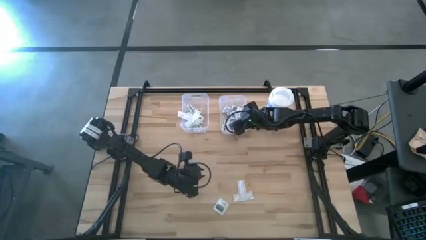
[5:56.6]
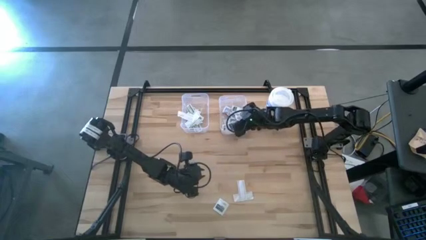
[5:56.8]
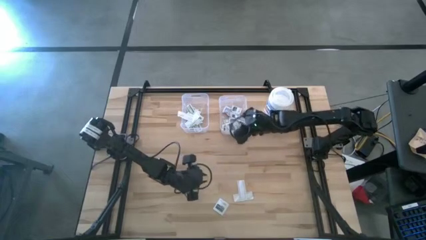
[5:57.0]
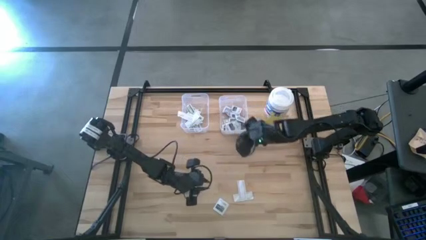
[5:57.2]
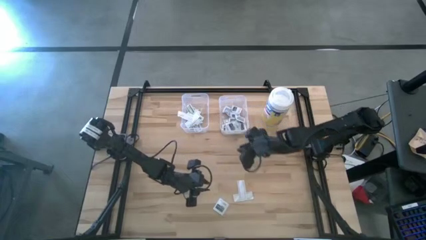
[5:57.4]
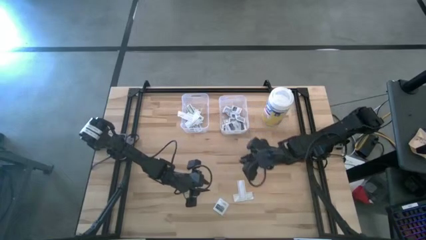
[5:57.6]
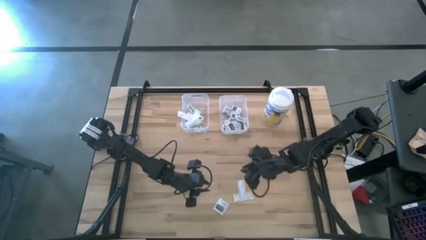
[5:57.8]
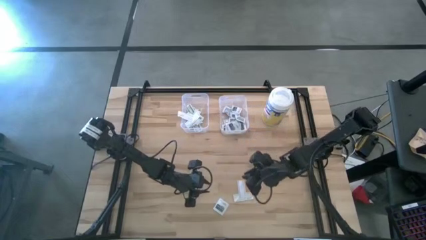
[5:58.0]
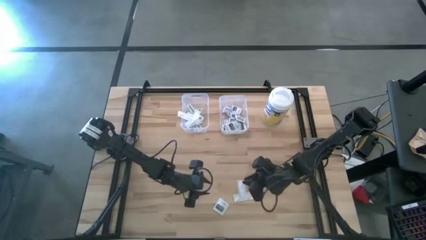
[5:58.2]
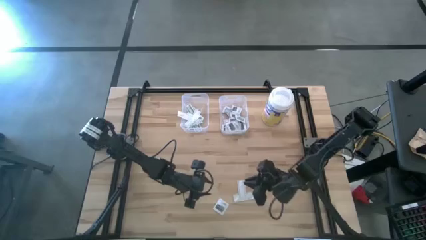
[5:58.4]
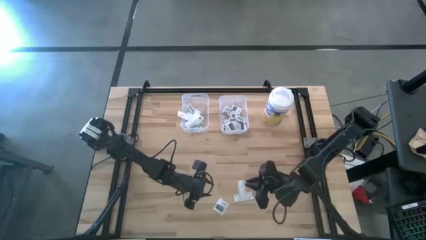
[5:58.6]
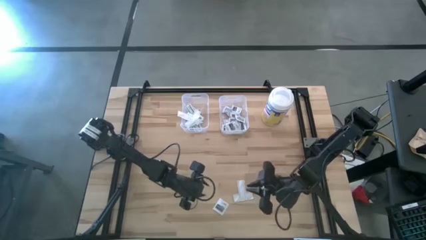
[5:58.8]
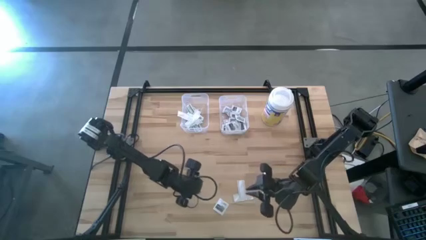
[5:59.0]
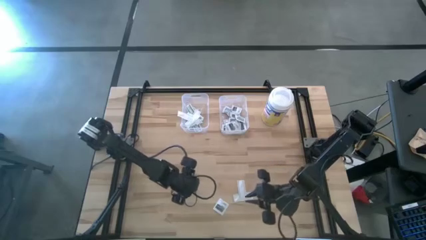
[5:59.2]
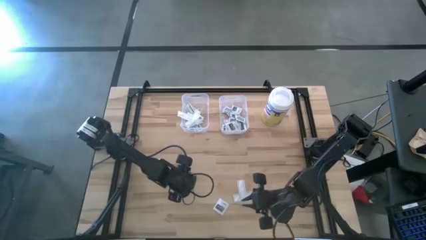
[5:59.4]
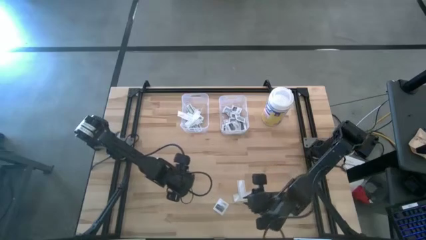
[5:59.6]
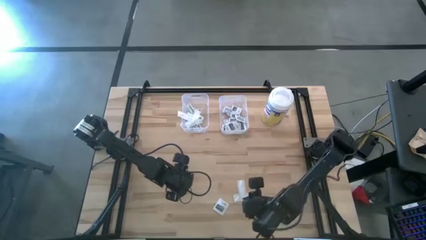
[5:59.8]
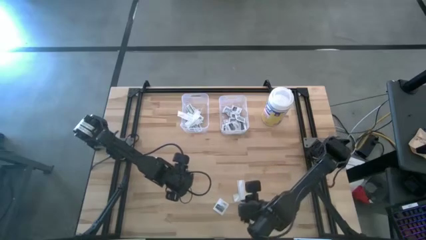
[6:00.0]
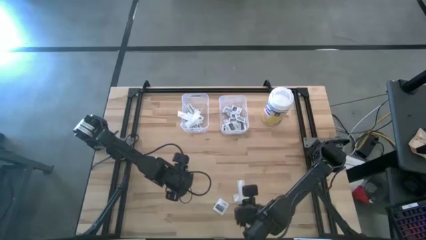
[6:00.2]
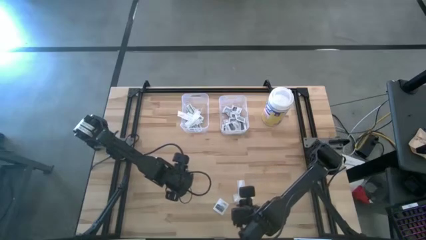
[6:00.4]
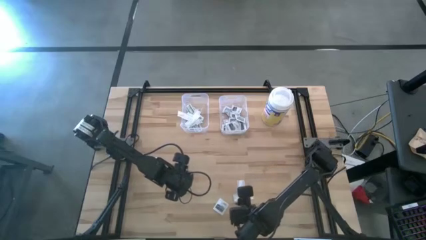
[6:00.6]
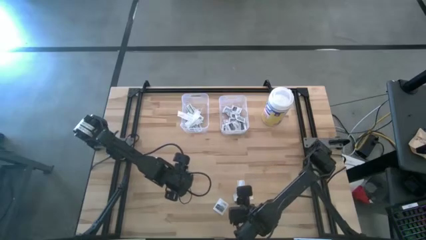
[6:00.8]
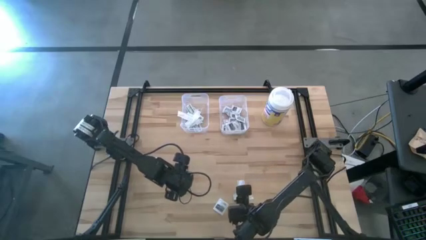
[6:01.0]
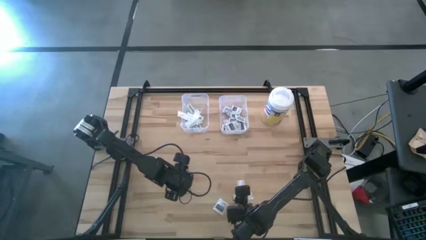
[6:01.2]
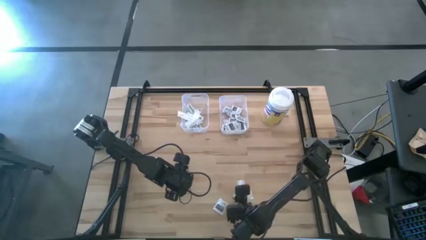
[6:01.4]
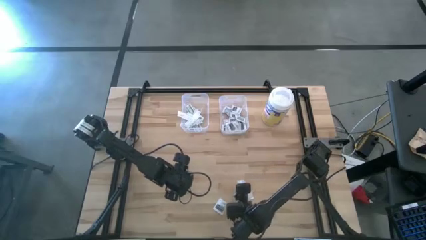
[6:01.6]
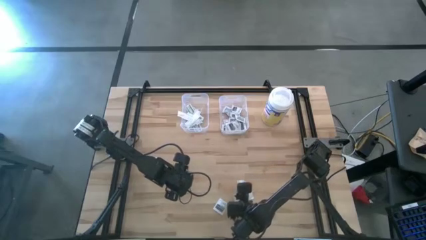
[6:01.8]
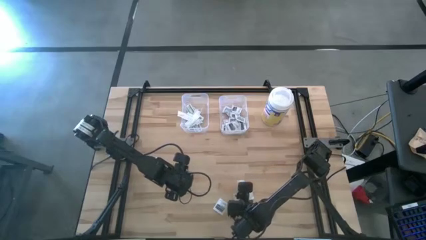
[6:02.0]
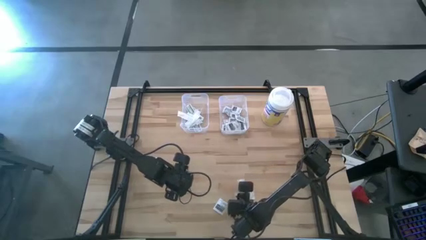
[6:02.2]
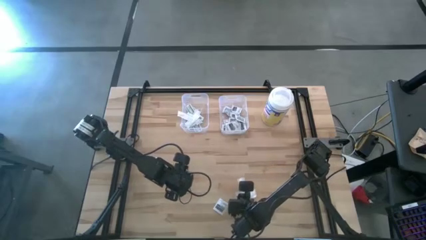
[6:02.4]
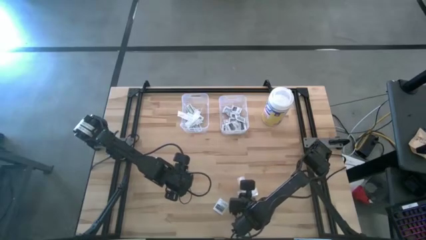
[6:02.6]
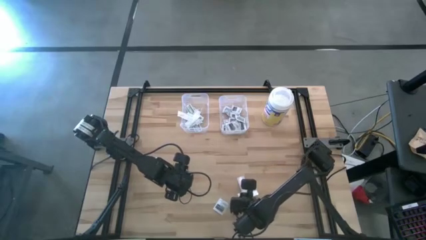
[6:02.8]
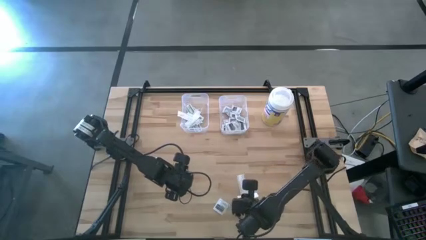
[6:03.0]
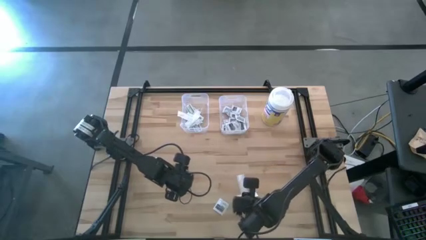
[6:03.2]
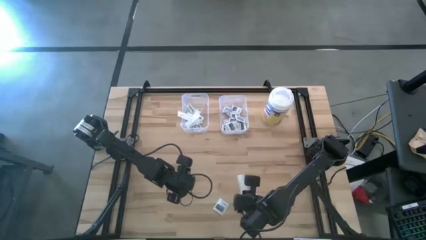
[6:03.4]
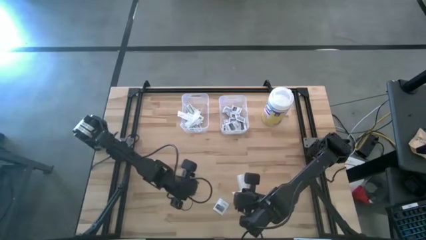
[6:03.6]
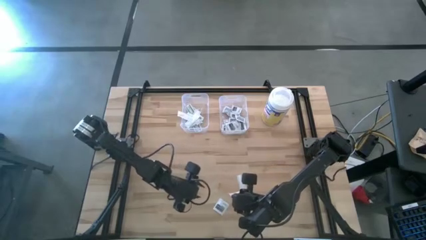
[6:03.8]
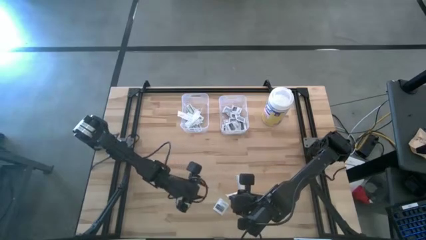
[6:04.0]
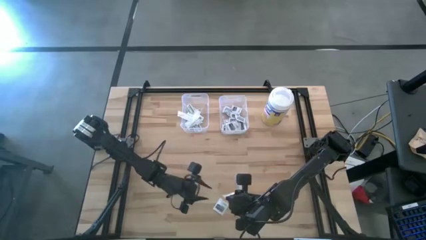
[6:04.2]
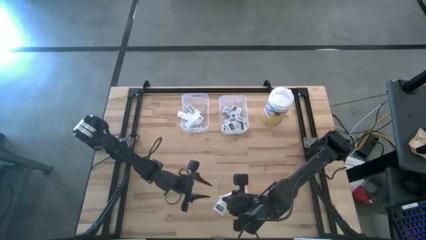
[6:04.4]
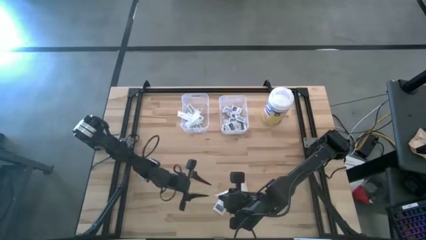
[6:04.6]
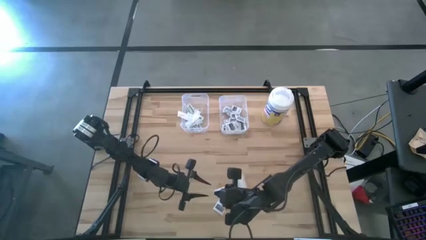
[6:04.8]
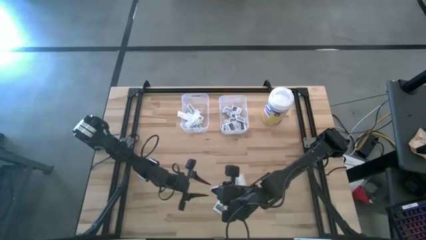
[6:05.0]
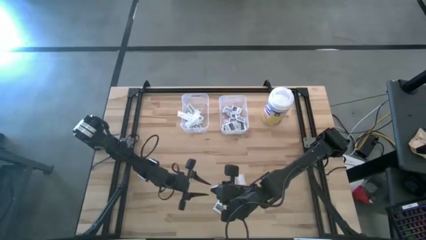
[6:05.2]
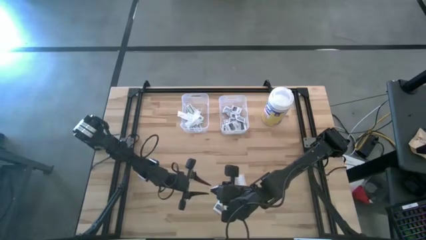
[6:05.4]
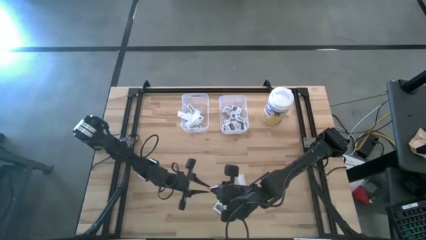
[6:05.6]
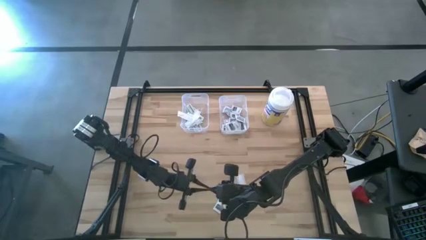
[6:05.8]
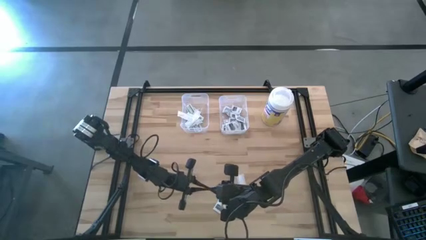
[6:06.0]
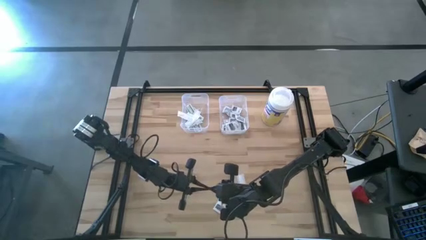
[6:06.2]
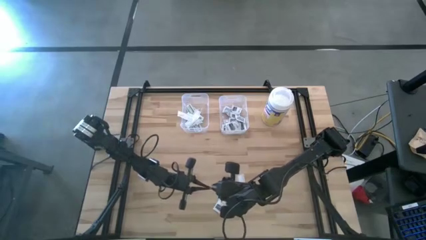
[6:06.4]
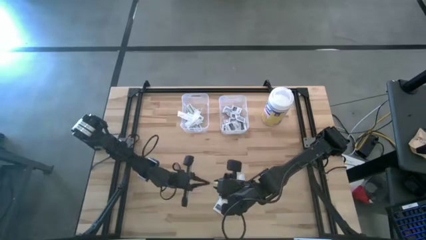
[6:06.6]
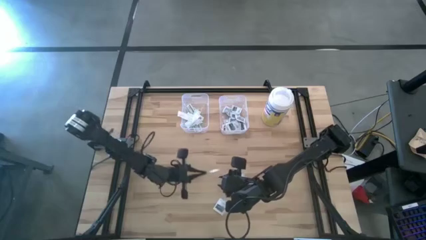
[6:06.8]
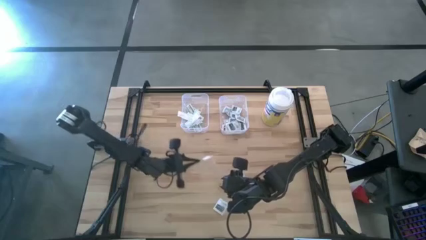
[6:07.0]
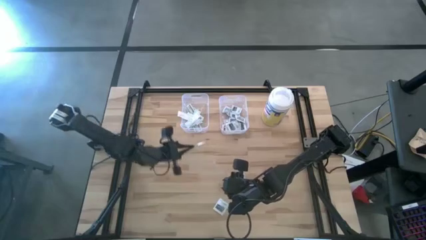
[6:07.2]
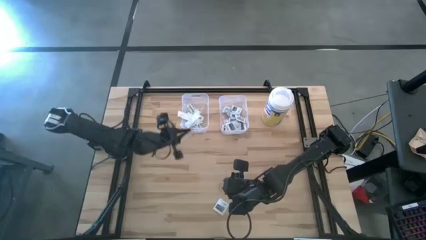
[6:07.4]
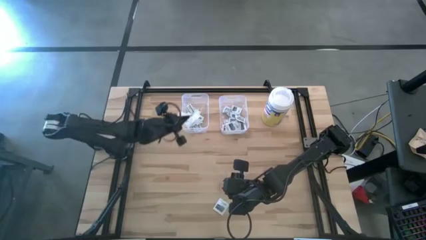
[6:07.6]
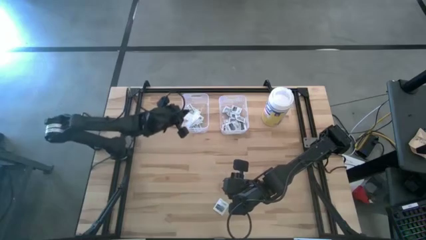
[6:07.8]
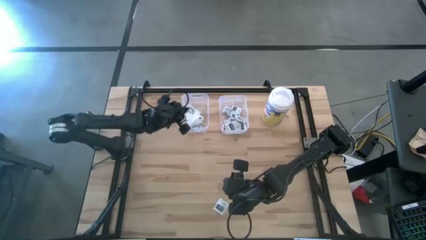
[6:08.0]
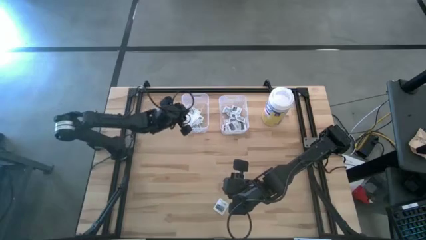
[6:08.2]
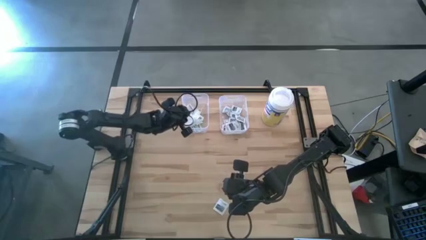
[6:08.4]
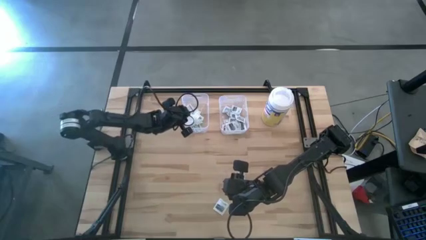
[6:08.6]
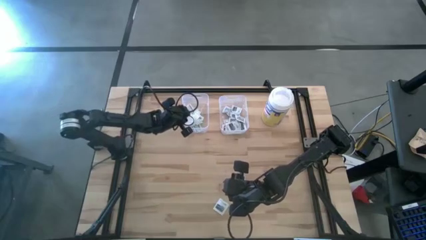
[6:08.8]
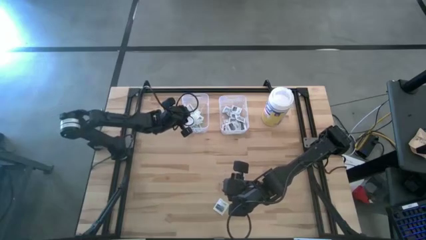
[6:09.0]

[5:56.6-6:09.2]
Task: Pick & Place First Aid Supplies
Put the green bandage pack into the left transparent bin

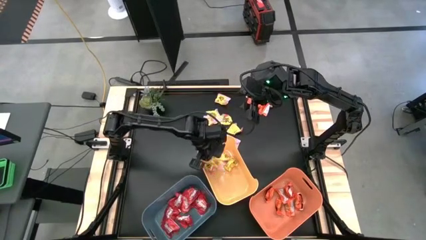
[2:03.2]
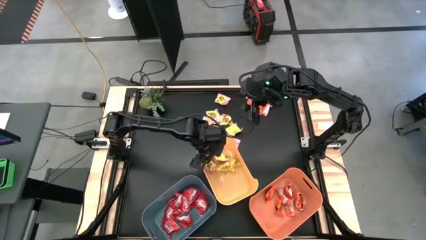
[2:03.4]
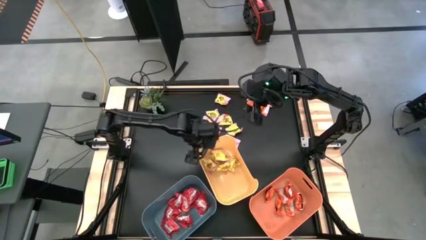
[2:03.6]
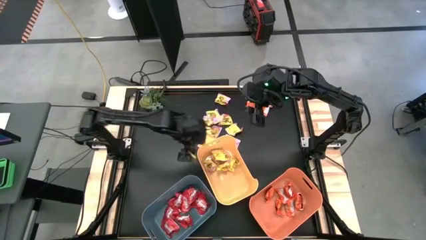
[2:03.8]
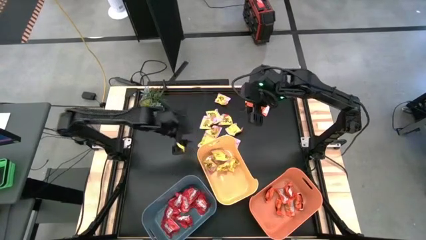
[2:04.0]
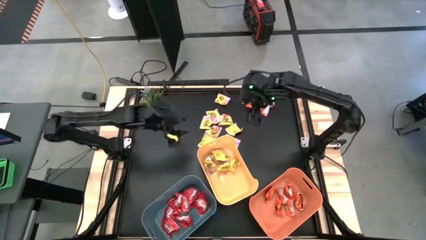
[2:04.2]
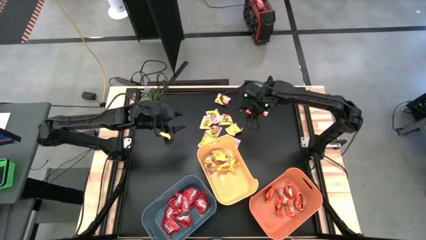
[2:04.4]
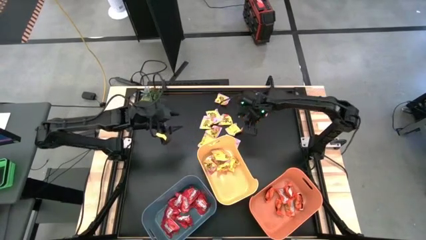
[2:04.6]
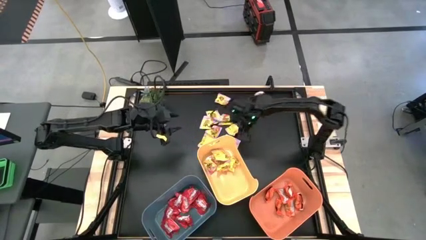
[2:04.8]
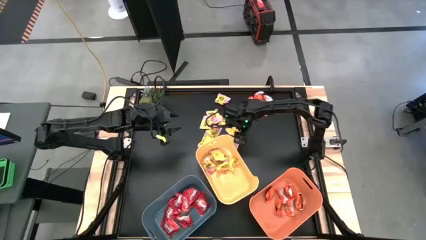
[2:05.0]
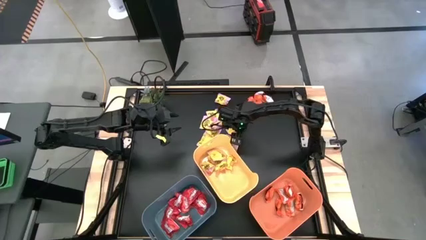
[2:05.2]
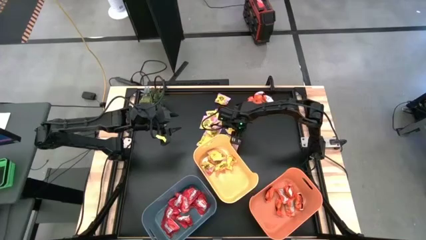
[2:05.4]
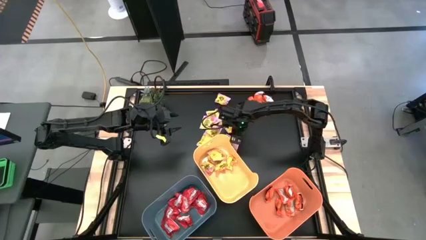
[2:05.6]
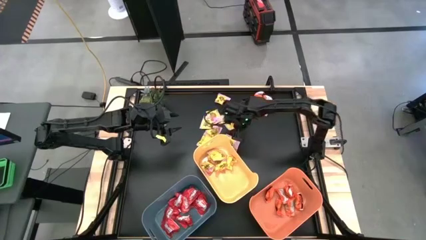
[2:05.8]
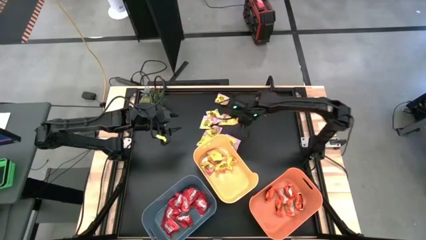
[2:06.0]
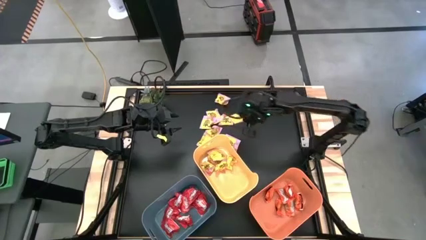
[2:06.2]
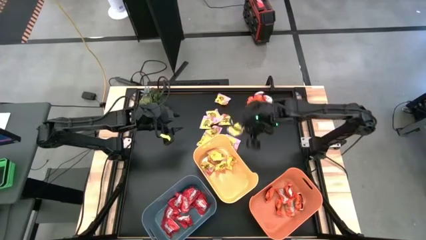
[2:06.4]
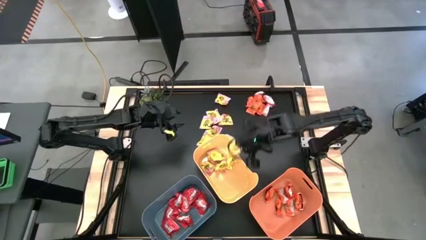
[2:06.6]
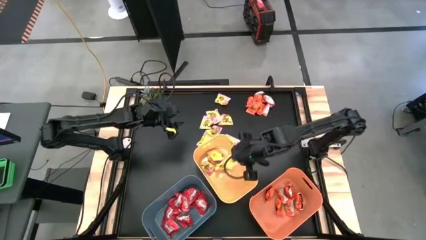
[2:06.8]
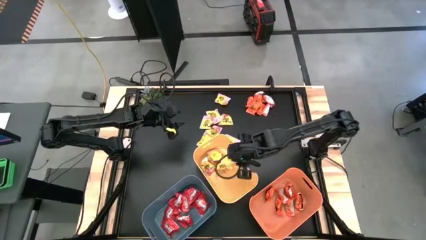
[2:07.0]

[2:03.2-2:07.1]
Task: Sort candy
Put the yellow candy into the yellow bin
